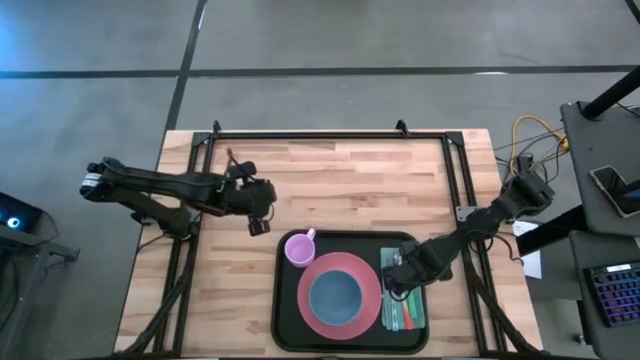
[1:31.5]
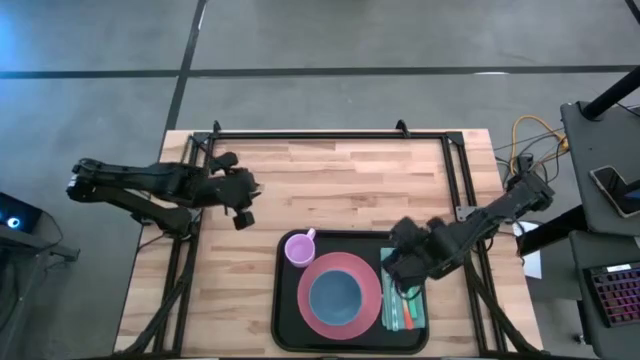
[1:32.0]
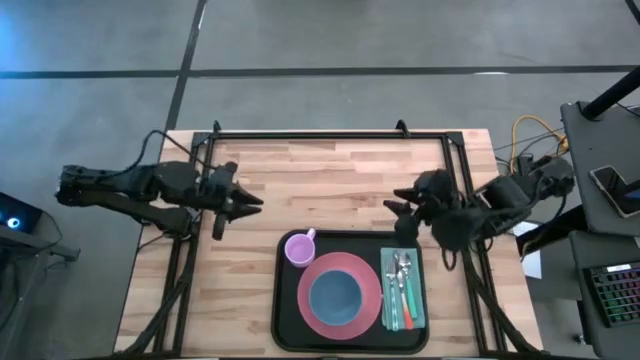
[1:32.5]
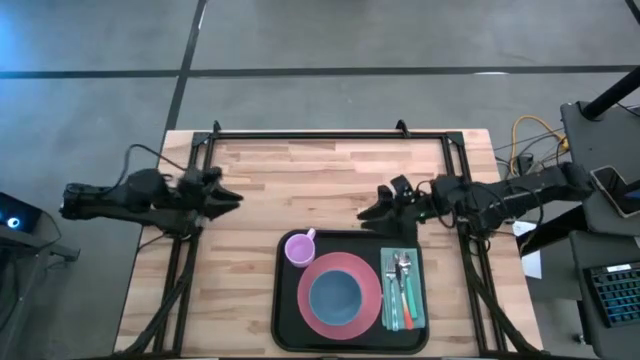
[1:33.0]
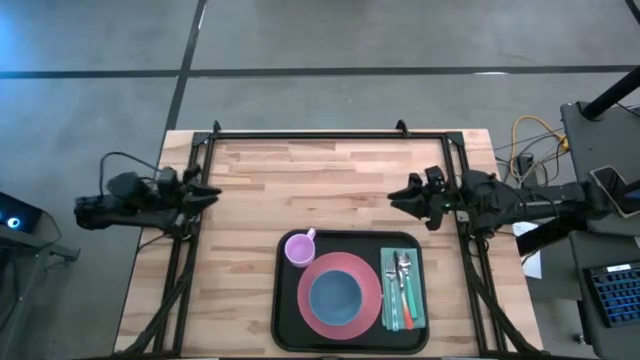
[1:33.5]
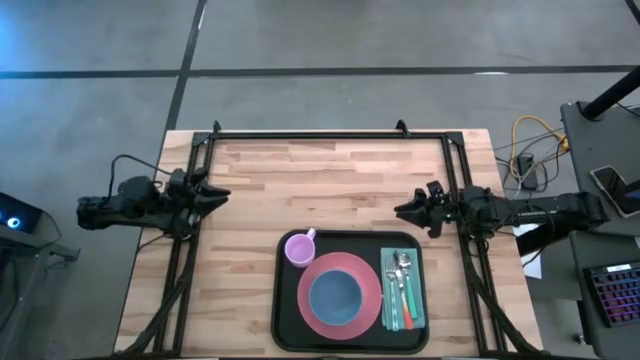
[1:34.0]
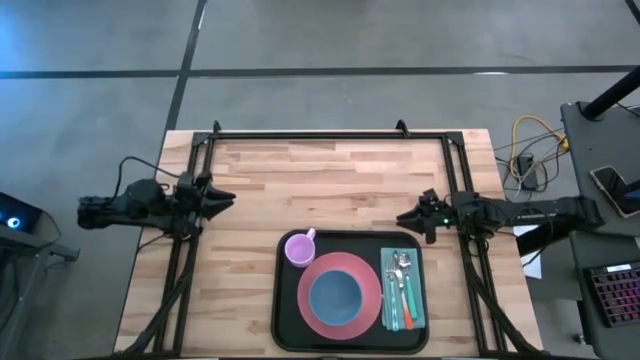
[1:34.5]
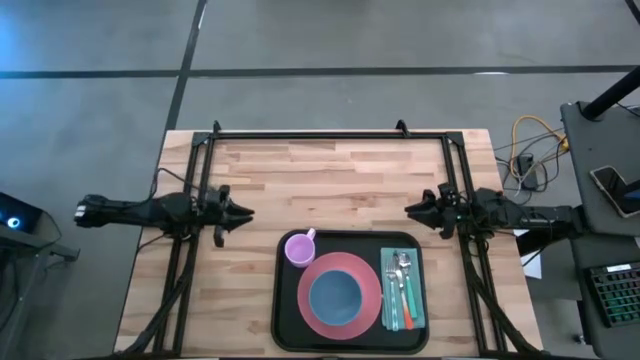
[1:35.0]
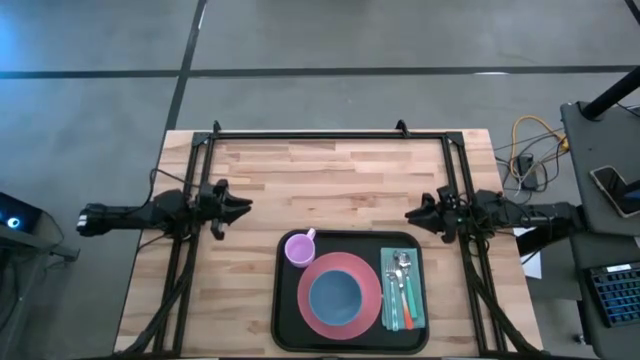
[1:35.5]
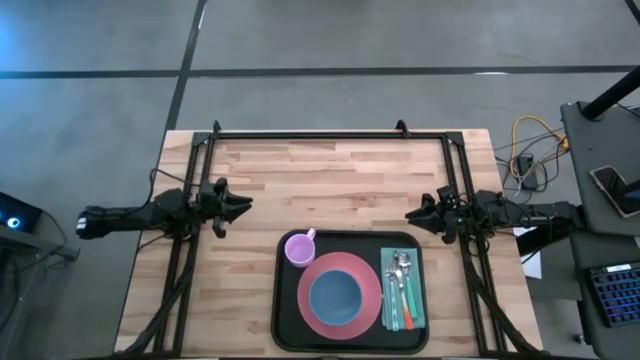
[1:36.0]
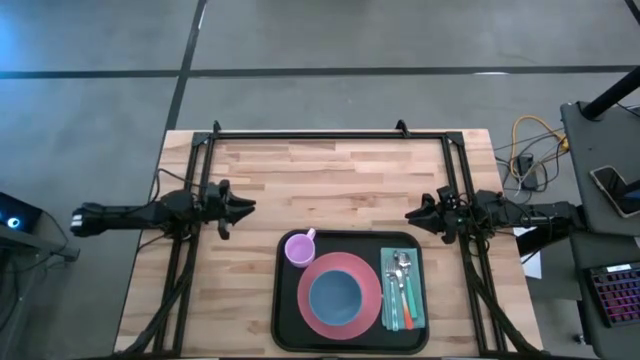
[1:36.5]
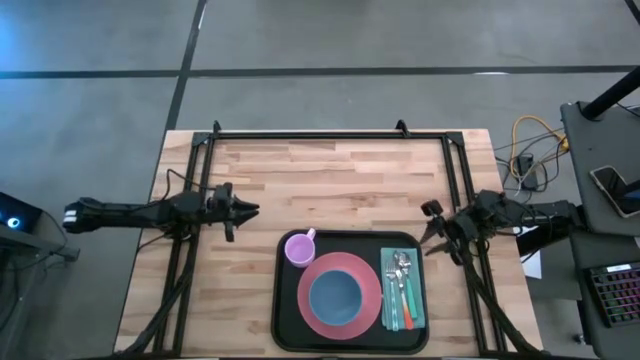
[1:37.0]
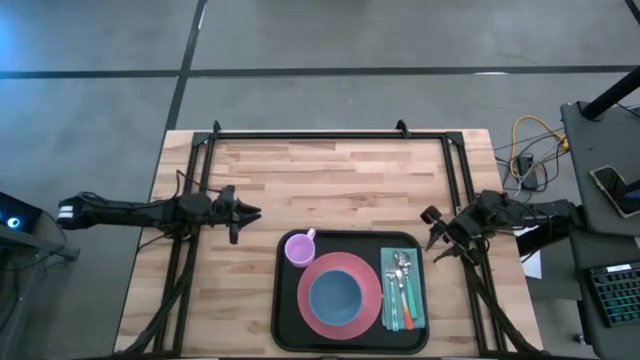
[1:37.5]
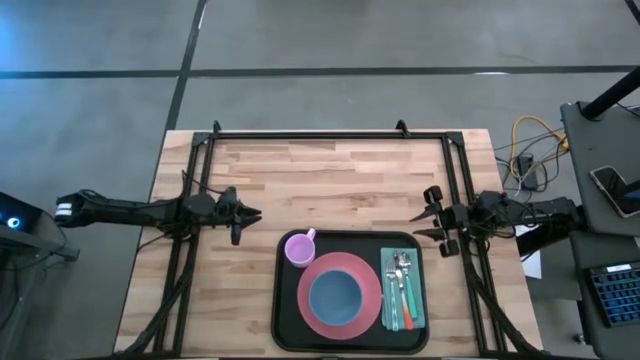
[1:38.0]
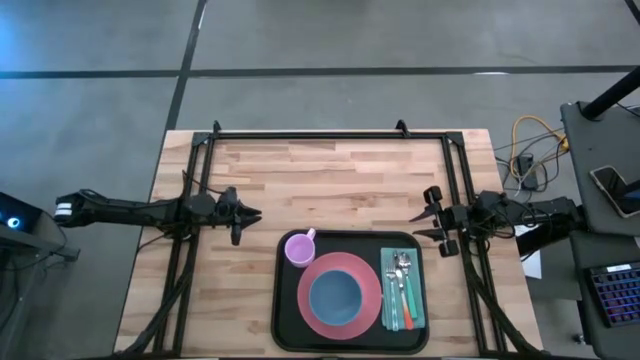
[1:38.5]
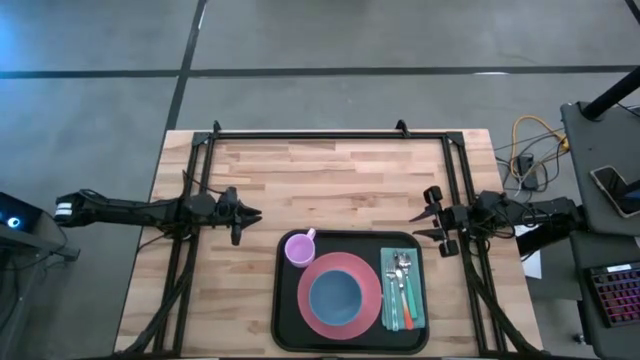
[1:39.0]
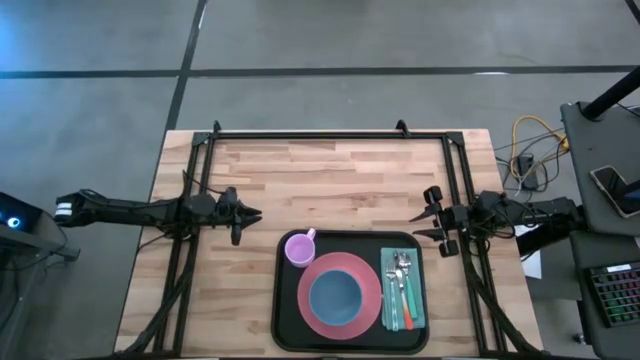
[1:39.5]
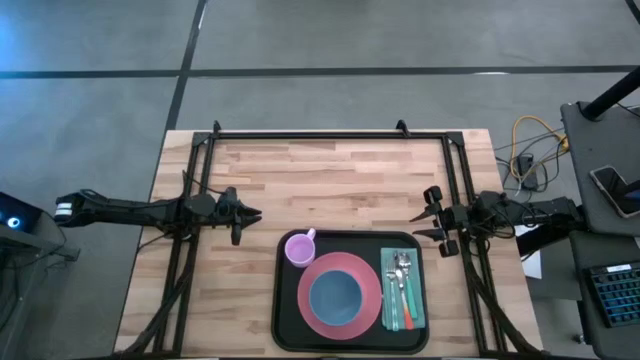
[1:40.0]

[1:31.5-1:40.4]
Task: Set up tray
Return to Home Position

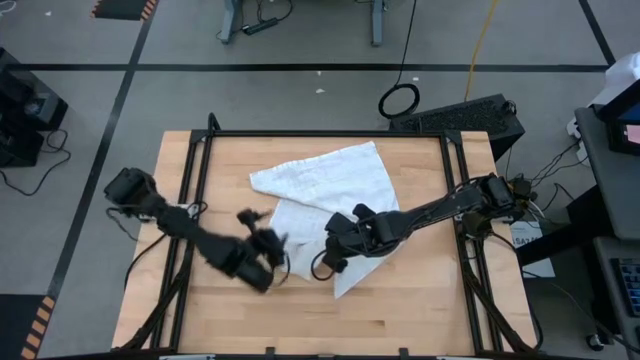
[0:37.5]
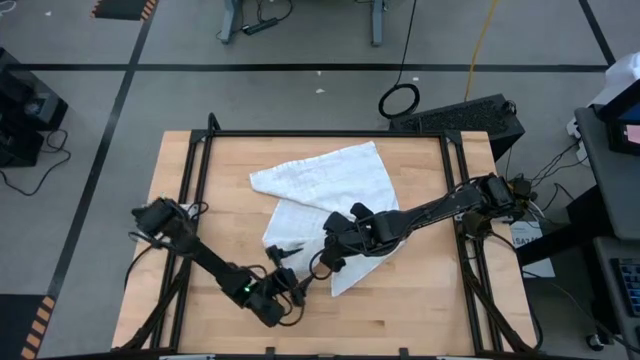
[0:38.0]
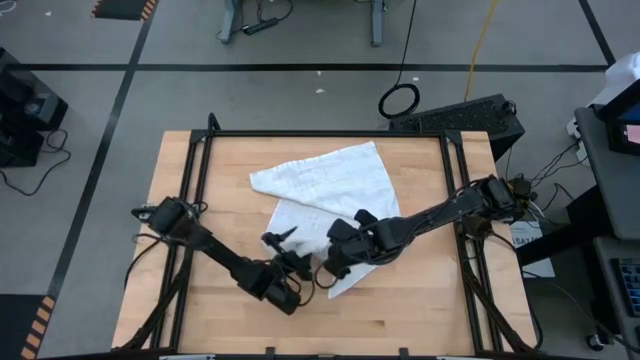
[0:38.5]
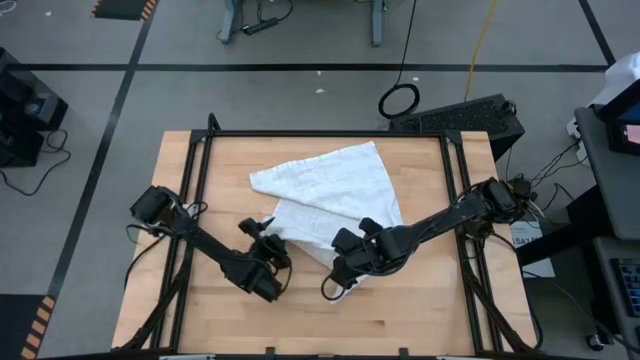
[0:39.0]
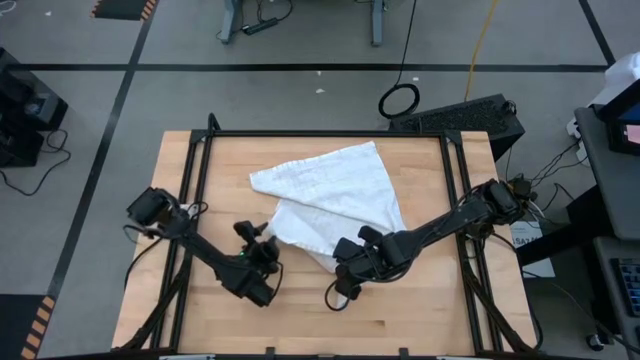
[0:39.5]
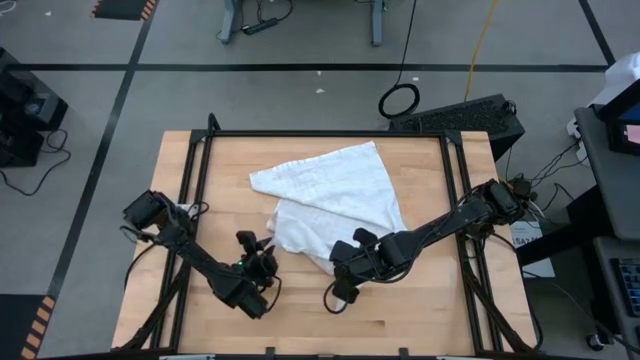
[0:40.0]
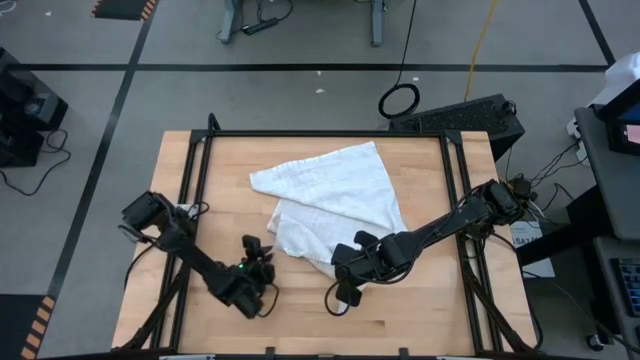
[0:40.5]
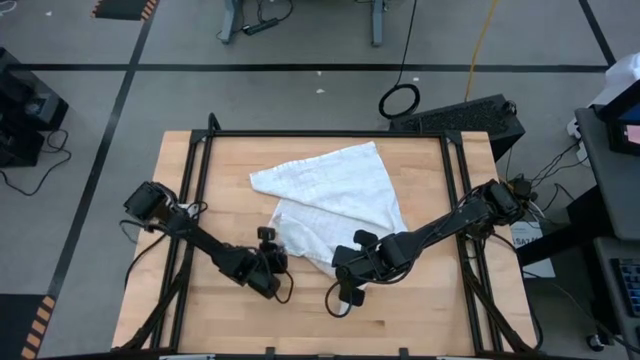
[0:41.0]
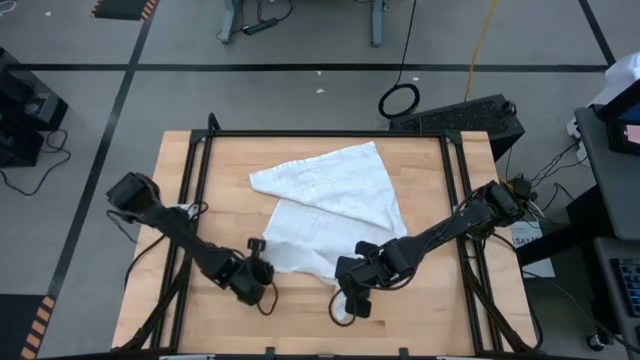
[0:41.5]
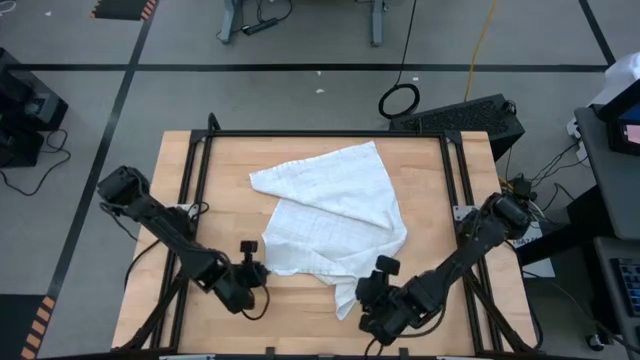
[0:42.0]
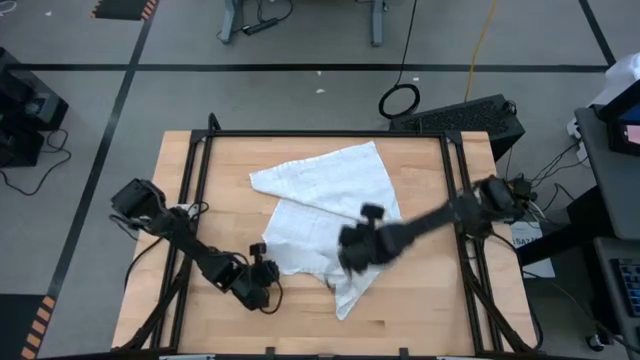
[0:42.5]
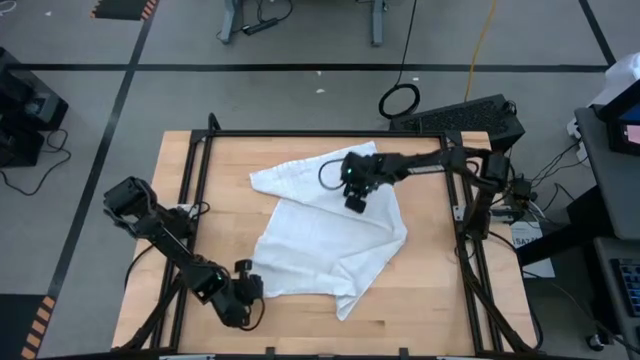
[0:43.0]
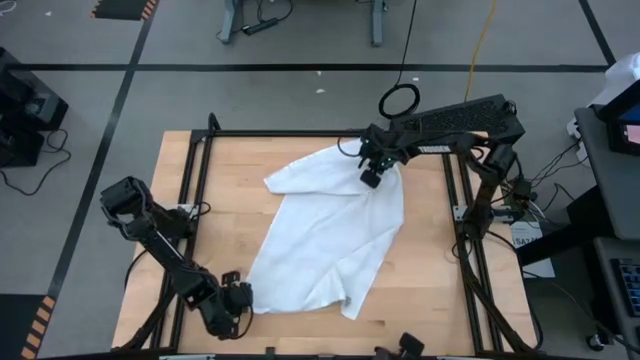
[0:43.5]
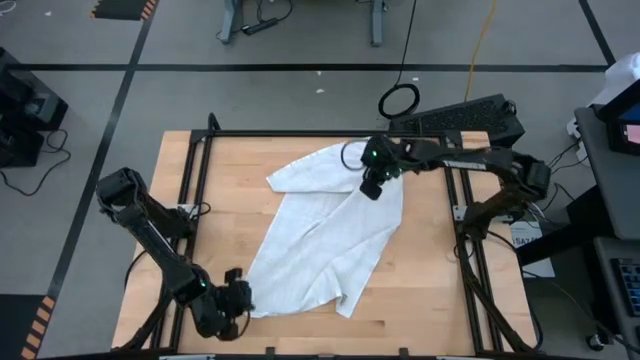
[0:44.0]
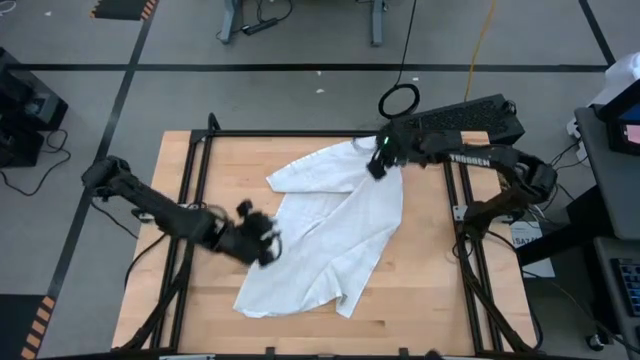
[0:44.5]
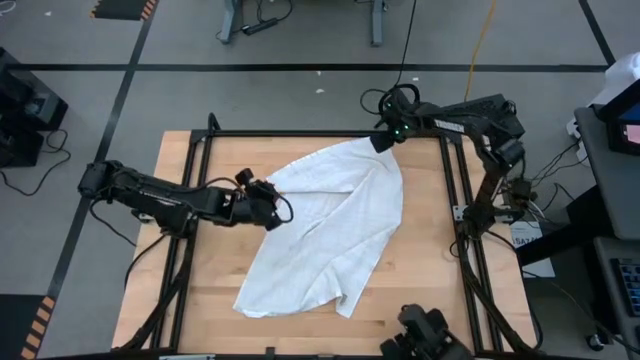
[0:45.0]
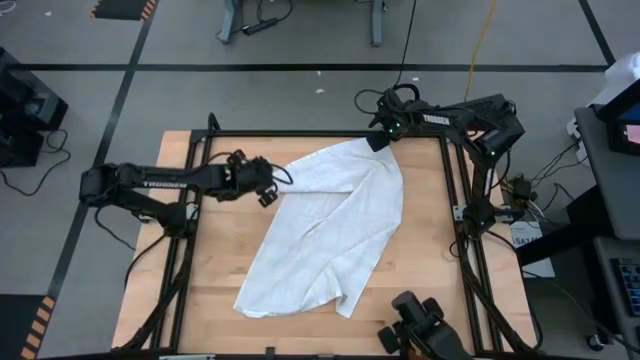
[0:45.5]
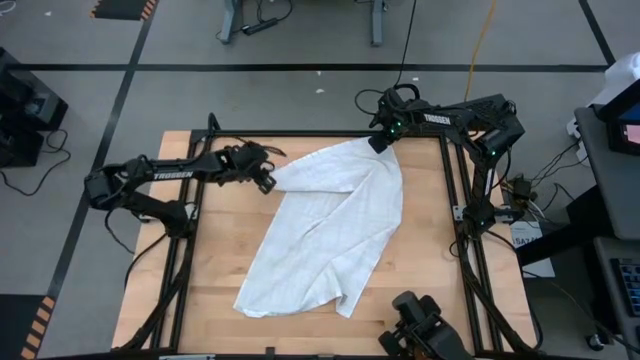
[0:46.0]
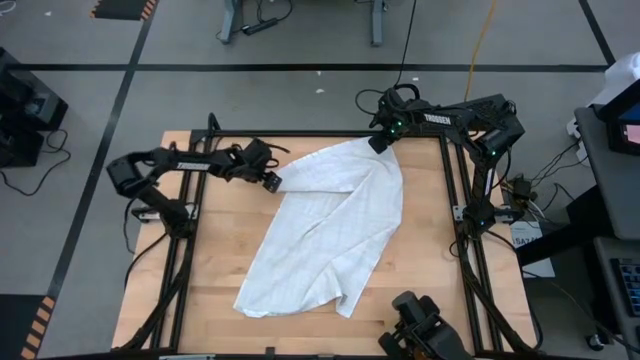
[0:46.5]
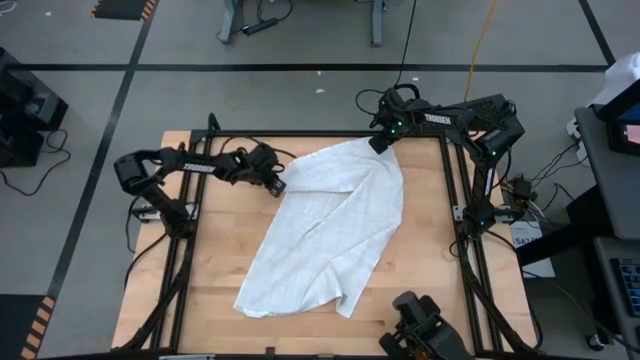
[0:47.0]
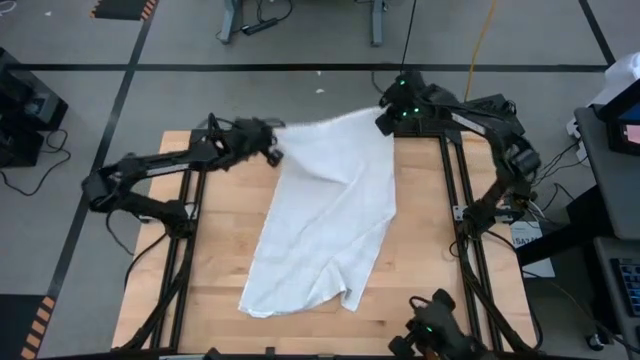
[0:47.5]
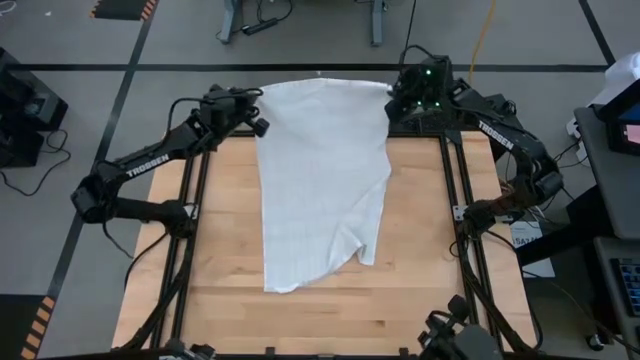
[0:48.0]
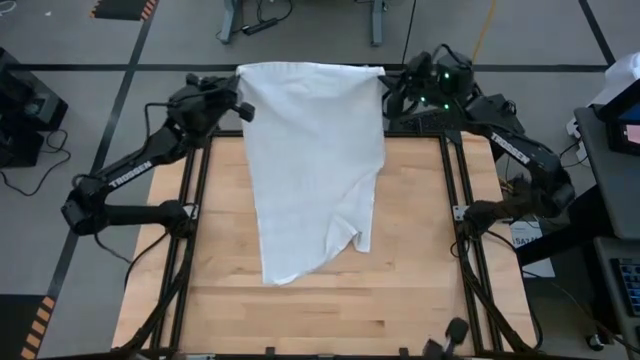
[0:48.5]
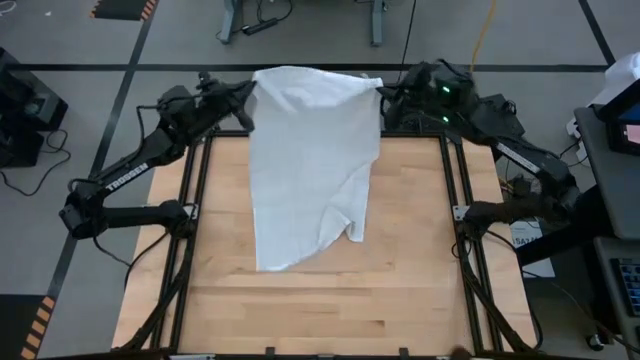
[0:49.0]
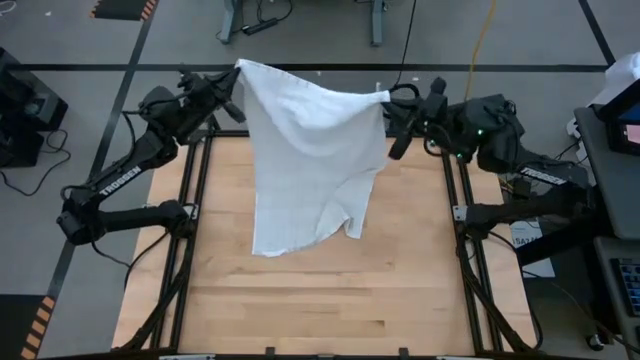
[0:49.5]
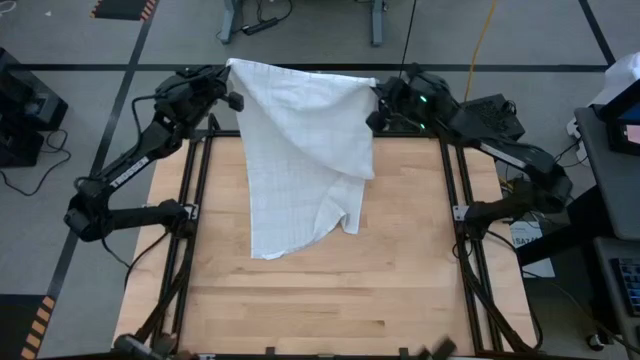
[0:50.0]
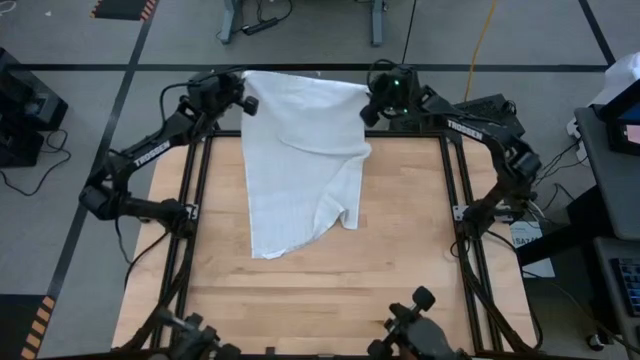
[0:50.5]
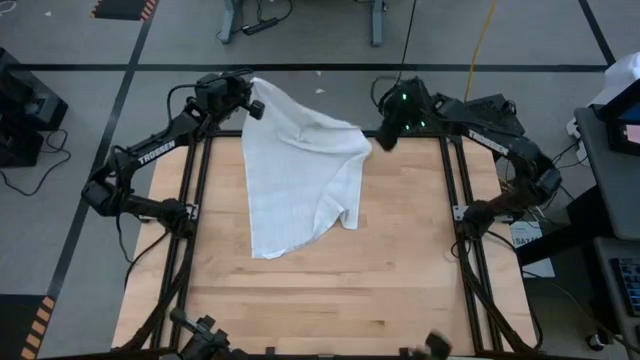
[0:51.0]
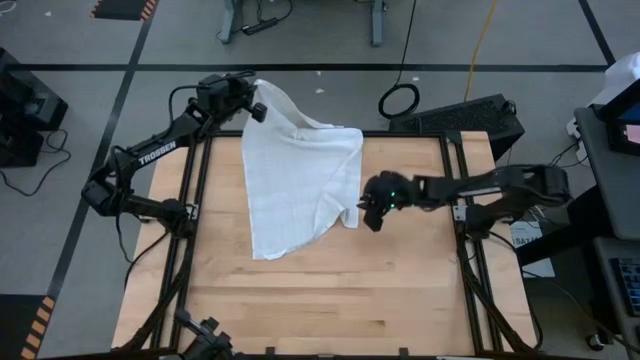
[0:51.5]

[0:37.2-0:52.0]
Task: Roll towel
Roll the white towel
